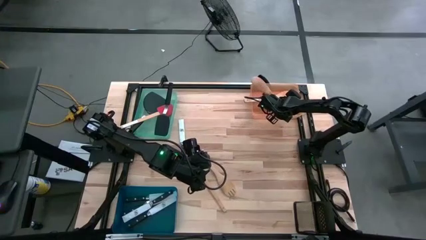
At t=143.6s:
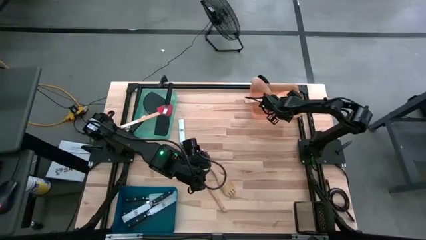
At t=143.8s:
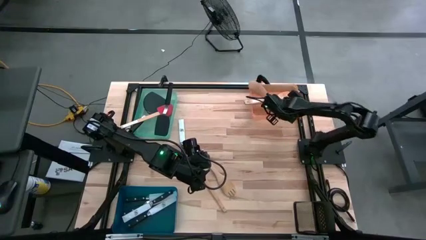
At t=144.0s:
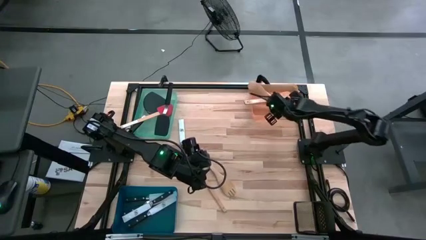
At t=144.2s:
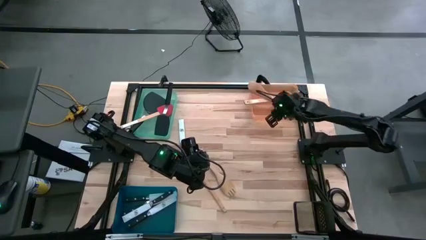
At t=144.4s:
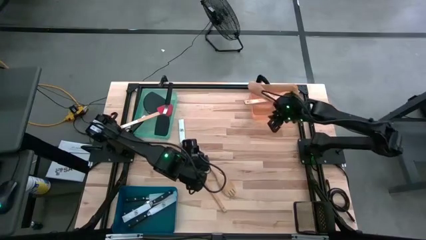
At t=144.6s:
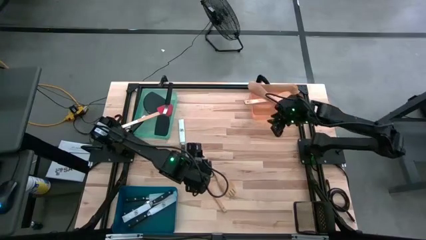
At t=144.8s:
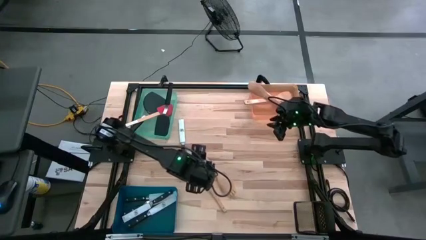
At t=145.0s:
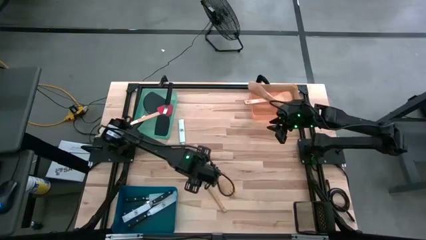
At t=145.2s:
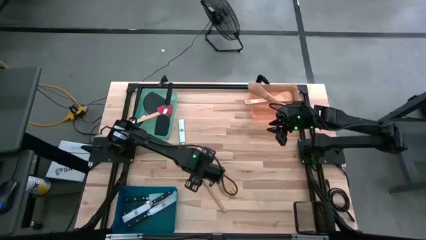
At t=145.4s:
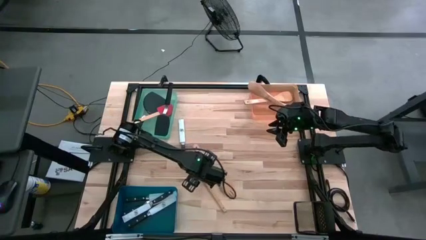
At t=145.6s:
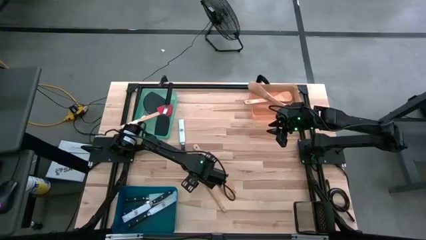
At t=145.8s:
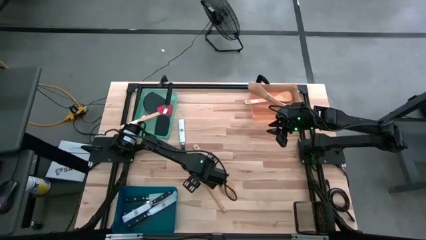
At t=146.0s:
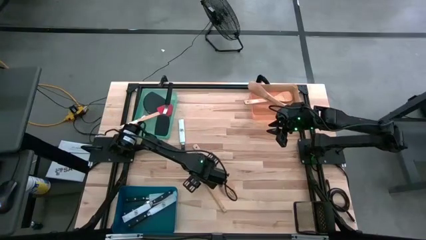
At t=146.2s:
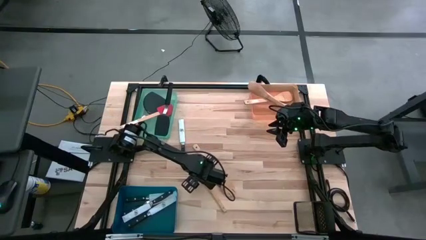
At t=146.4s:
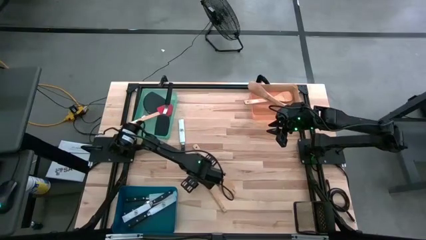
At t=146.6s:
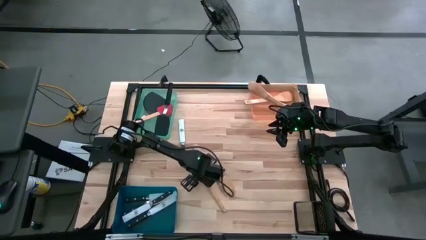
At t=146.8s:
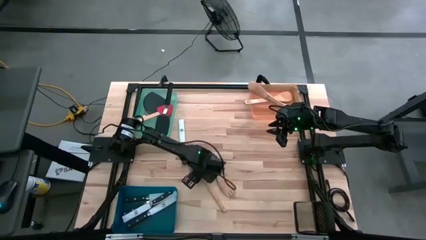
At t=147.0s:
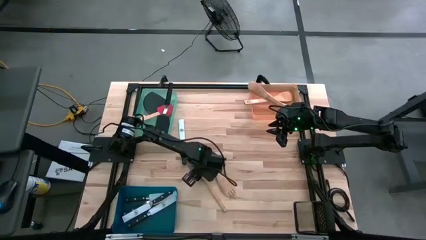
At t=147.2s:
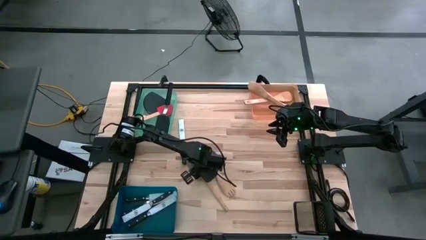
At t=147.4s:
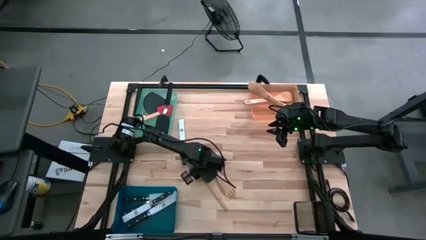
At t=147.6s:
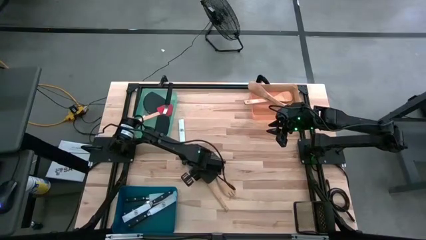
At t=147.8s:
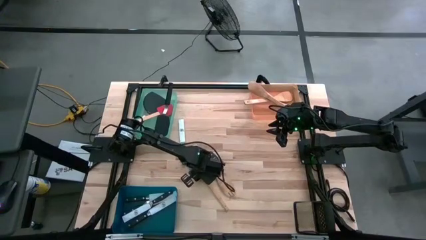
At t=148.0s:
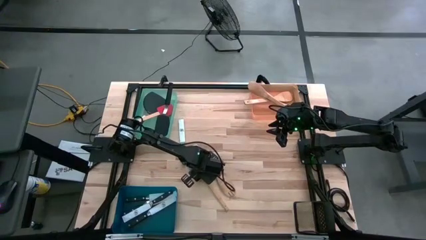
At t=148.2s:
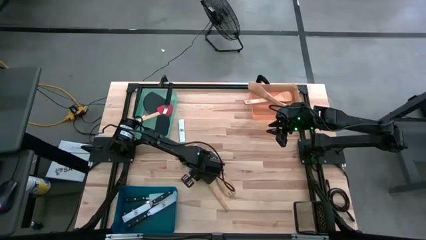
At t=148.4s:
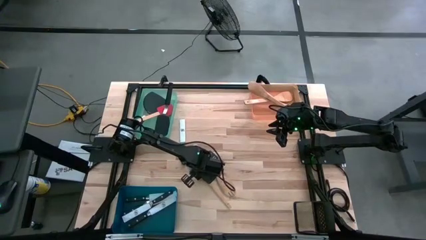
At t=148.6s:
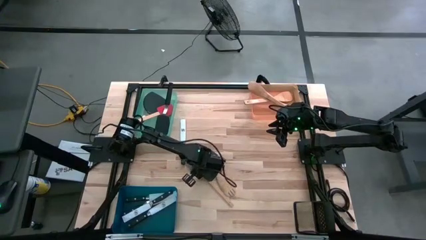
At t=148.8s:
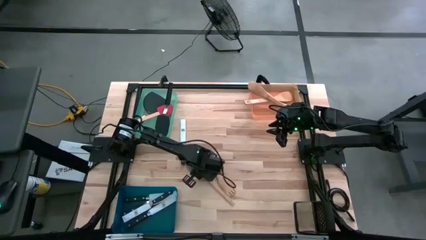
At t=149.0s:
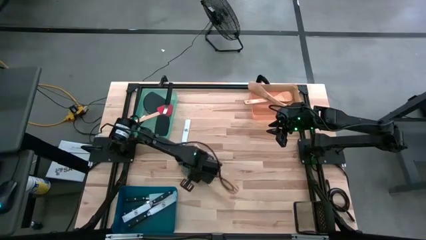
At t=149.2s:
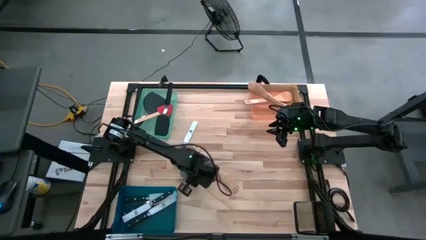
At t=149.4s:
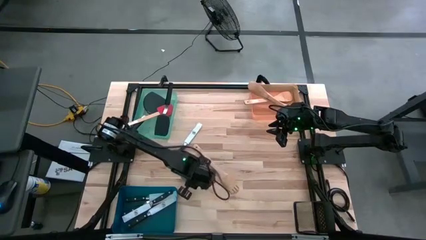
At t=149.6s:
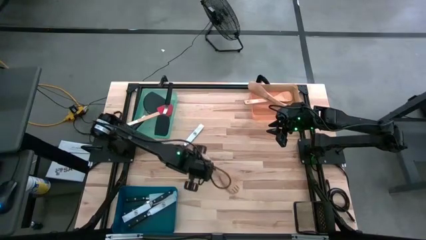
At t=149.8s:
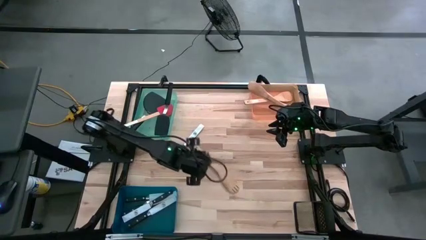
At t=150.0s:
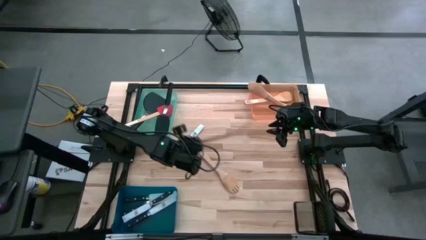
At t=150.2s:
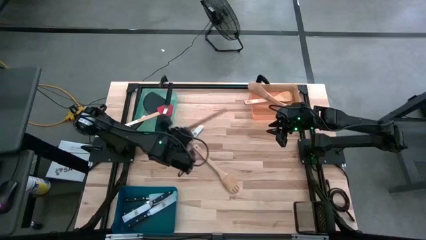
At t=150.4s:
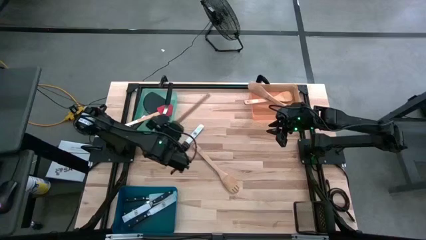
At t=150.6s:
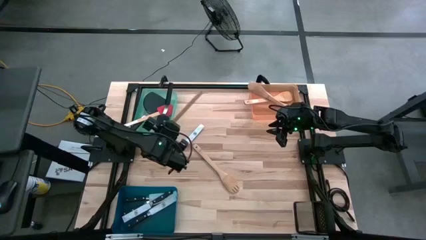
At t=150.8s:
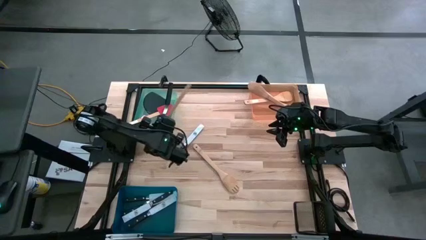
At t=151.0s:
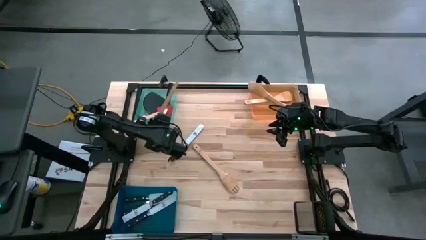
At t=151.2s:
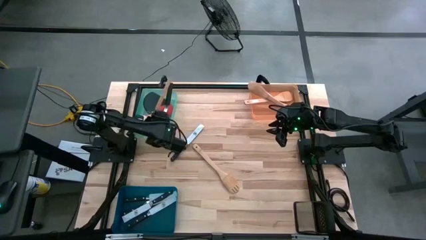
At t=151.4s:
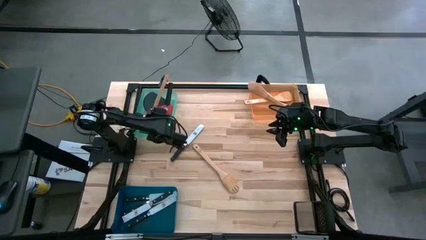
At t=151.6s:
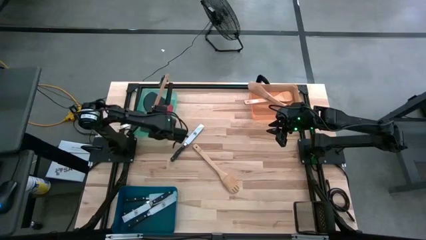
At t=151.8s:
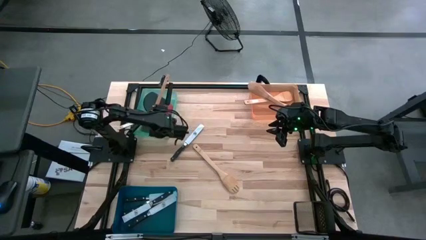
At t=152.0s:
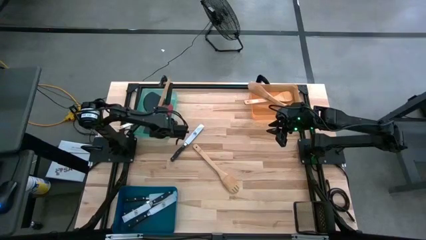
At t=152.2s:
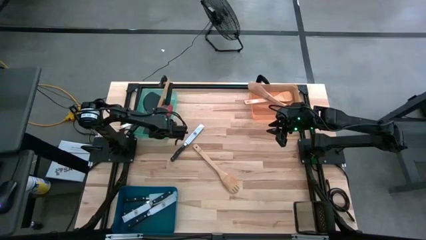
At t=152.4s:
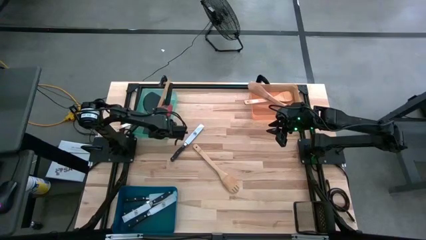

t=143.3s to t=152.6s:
Task: Pick & Place Kitchen Items
Put the gray scraper spatula into the blue green bin

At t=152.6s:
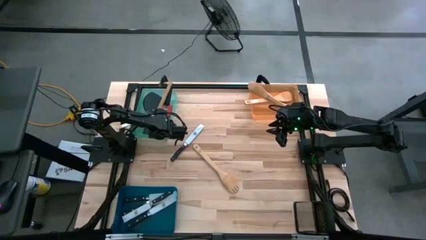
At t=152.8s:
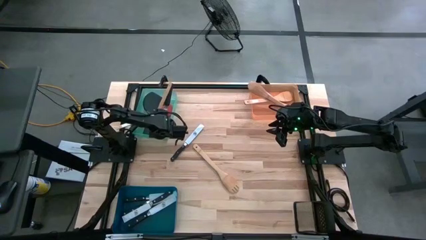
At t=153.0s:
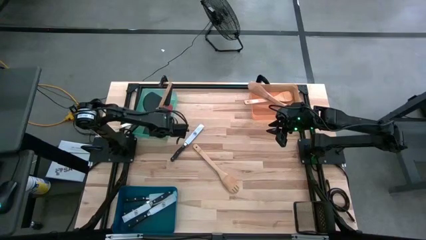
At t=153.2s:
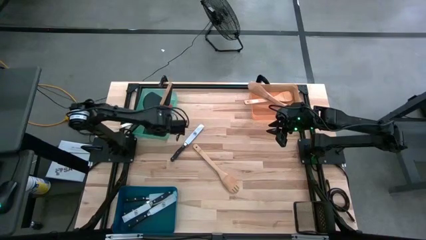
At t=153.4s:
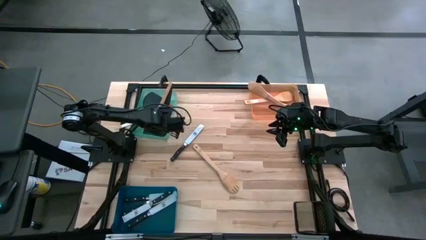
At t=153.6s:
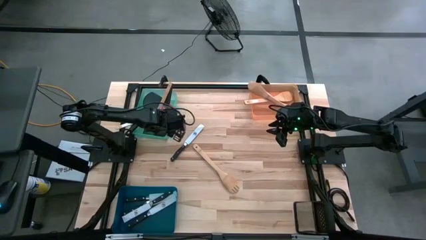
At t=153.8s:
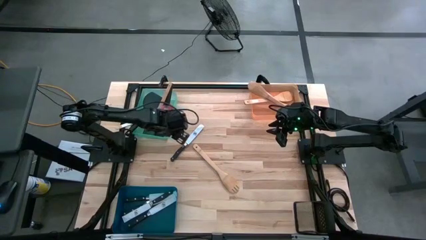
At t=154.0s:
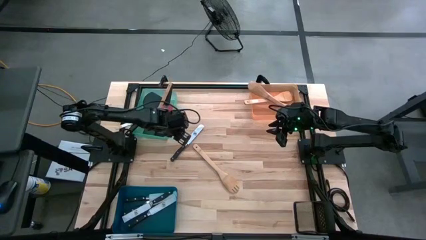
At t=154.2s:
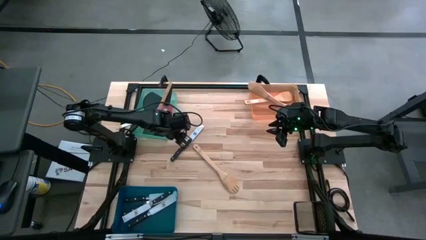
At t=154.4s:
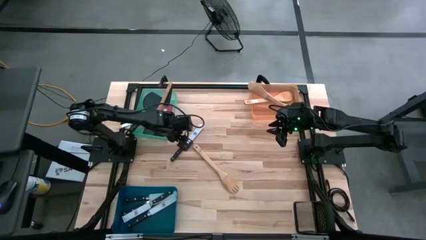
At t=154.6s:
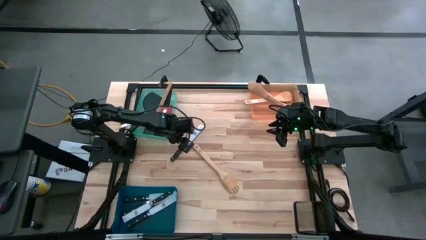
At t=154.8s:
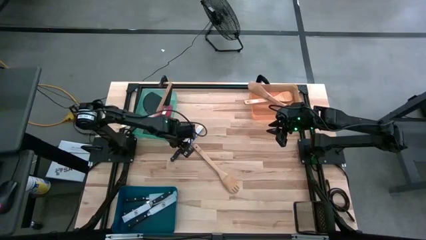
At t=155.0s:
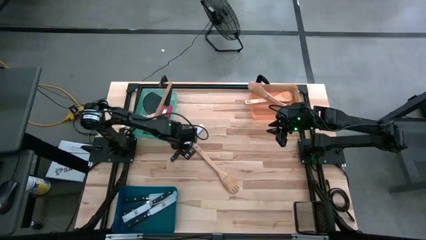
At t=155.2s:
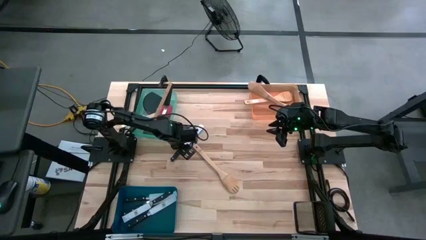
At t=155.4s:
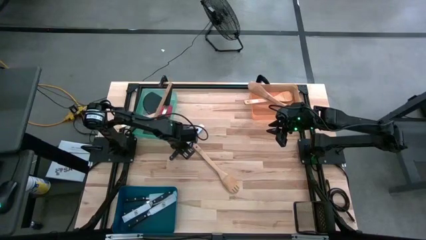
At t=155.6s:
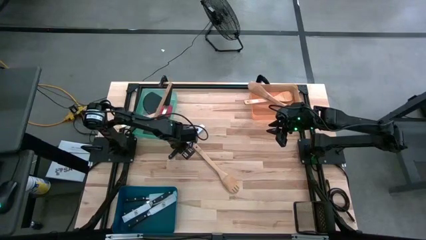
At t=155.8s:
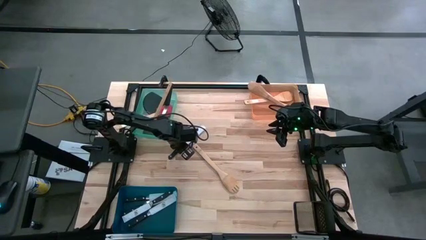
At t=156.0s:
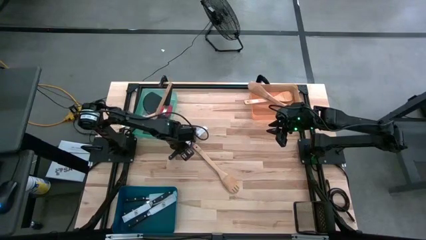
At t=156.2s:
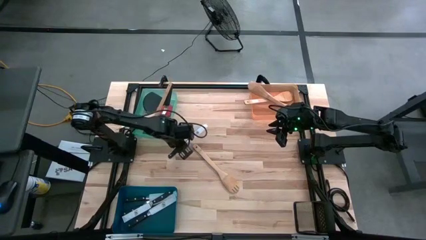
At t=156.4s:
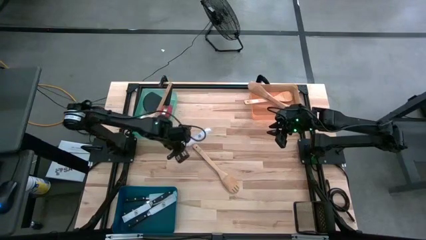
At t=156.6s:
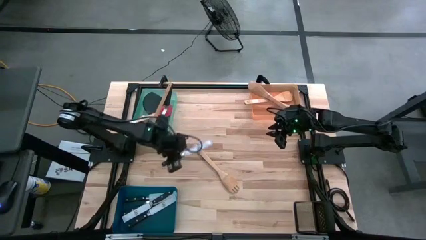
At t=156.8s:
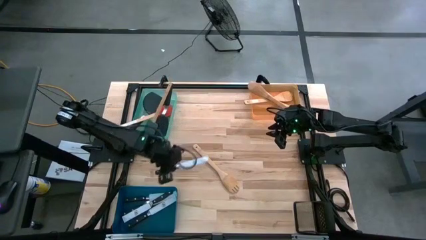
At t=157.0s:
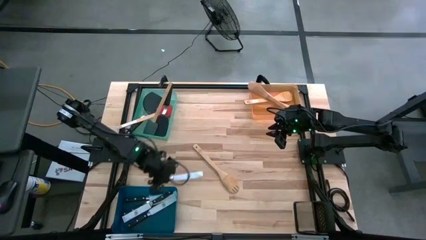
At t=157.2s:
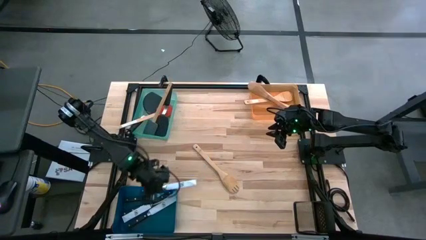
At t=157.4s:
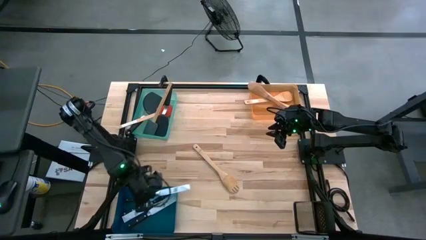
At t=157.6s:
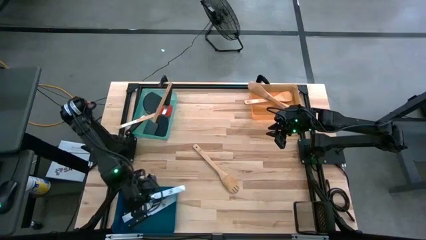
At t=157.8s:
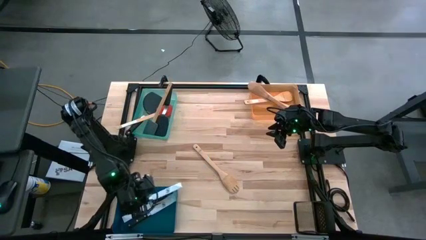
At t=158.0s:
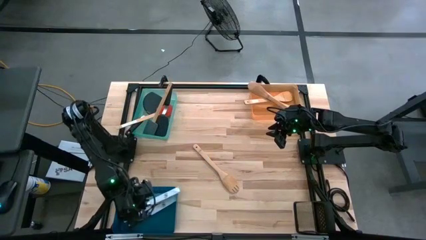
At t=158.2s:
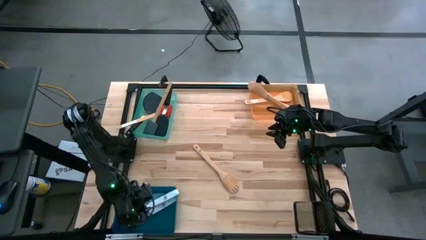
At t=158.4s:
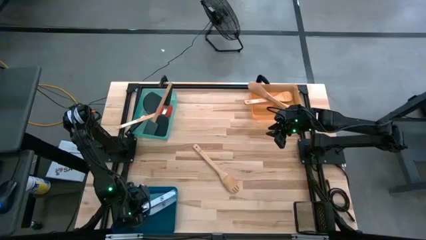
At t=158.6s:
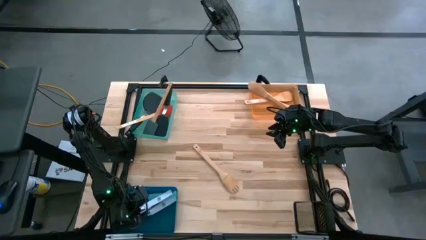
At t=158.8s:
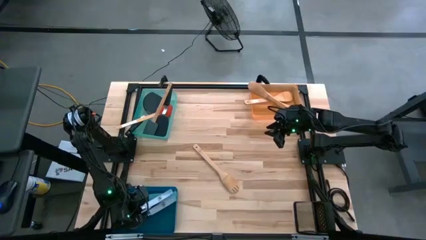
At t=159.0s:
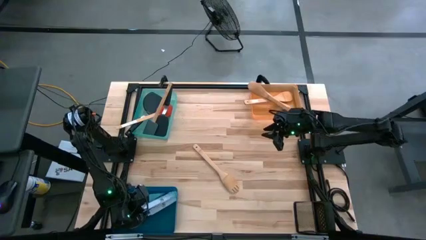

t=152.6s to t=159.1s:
Put the black knife into the blue bin
